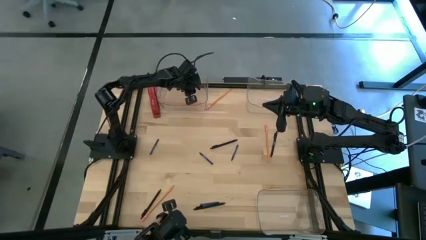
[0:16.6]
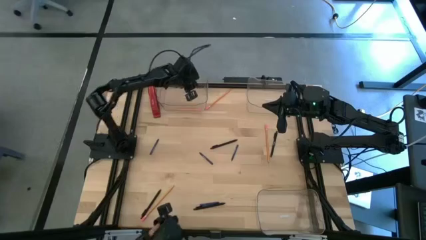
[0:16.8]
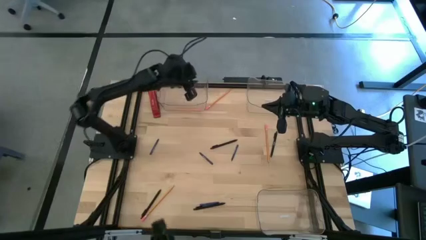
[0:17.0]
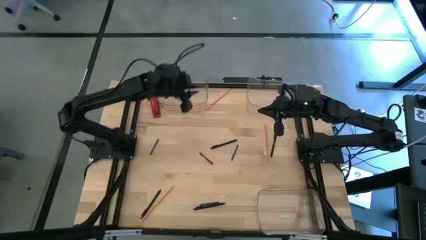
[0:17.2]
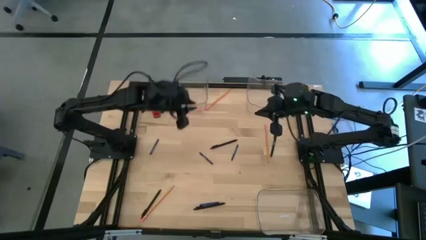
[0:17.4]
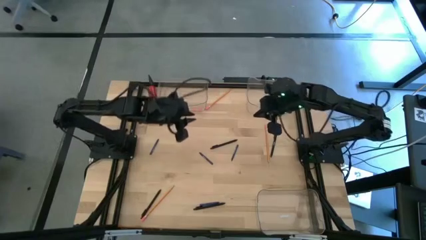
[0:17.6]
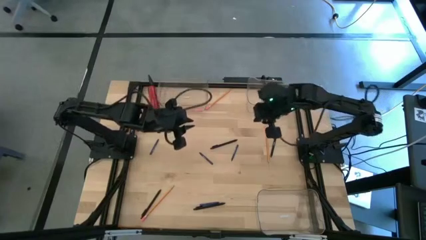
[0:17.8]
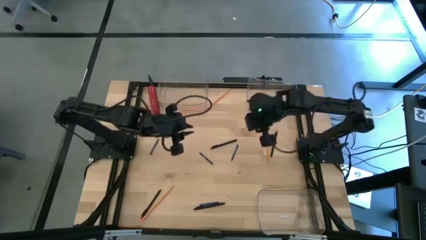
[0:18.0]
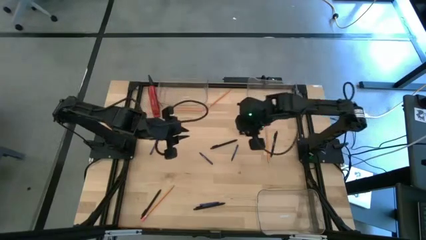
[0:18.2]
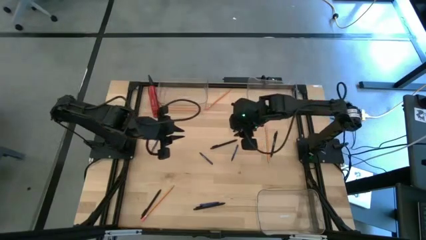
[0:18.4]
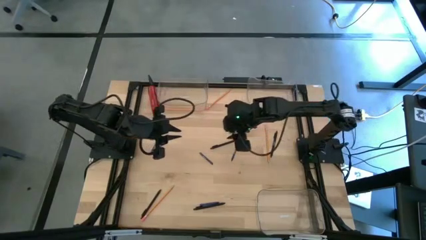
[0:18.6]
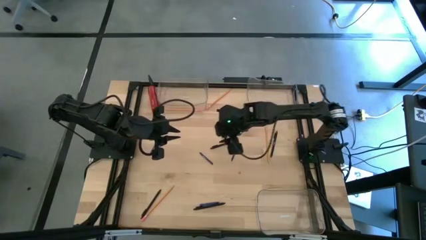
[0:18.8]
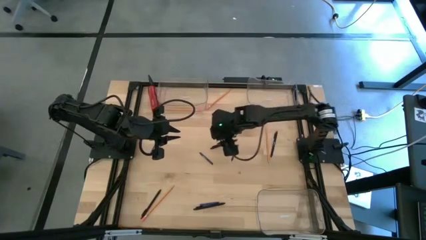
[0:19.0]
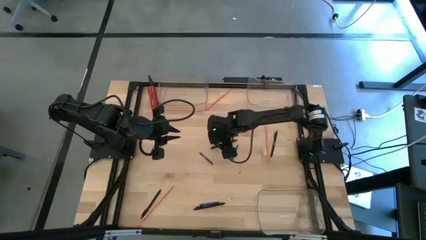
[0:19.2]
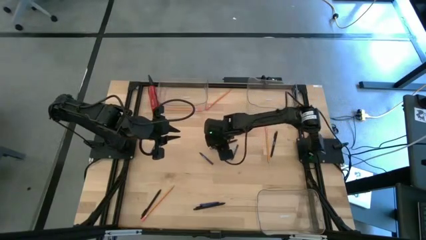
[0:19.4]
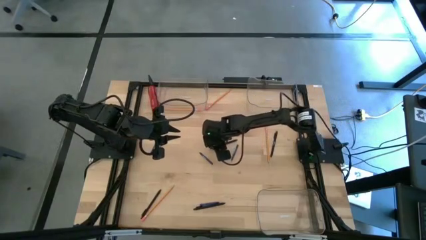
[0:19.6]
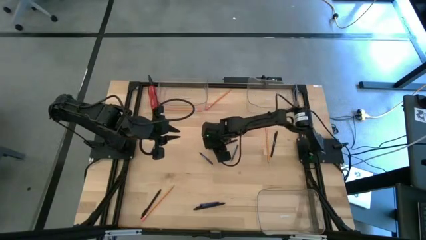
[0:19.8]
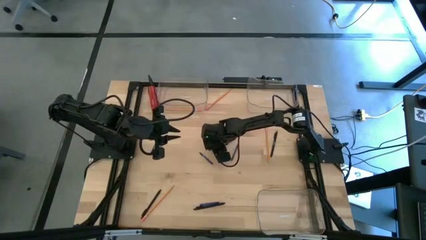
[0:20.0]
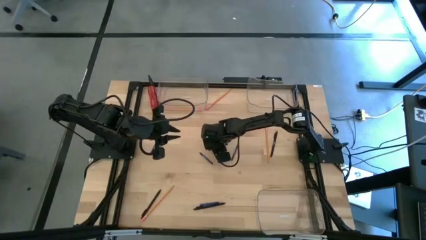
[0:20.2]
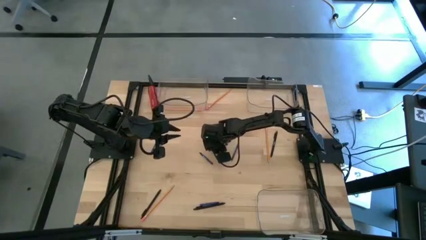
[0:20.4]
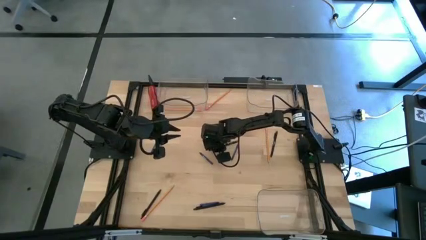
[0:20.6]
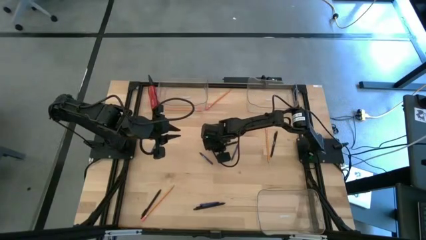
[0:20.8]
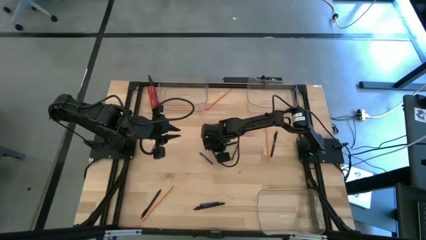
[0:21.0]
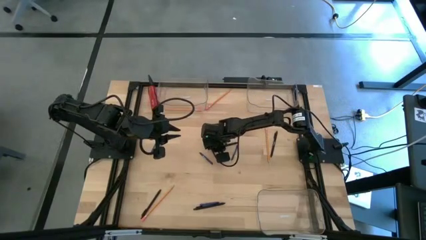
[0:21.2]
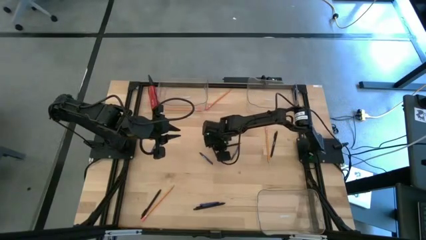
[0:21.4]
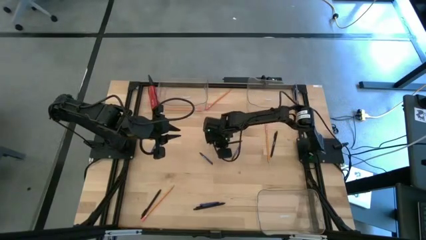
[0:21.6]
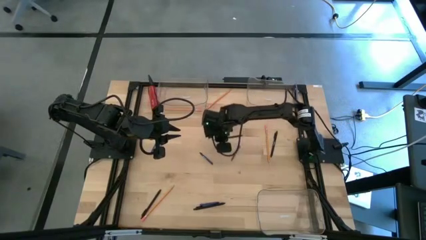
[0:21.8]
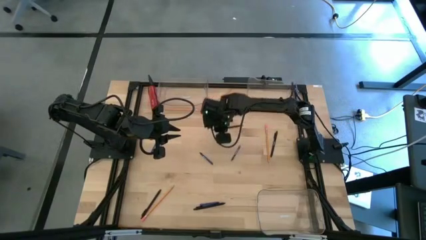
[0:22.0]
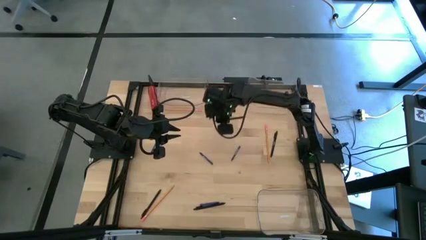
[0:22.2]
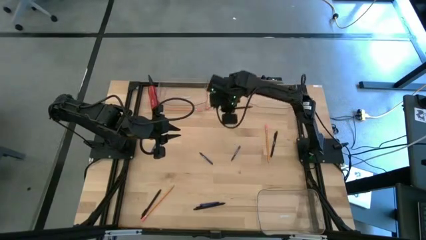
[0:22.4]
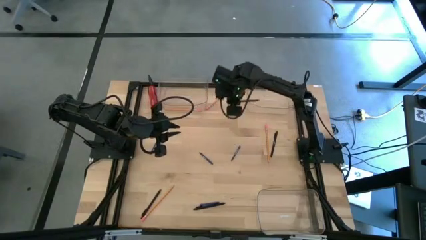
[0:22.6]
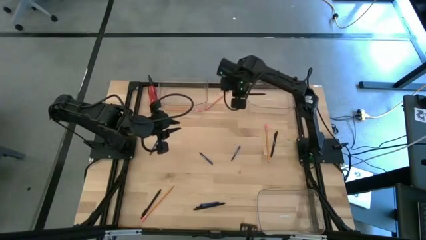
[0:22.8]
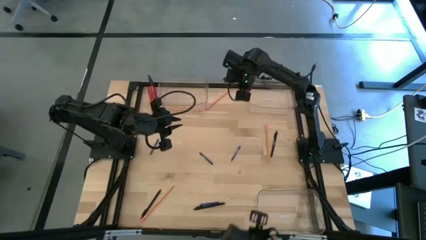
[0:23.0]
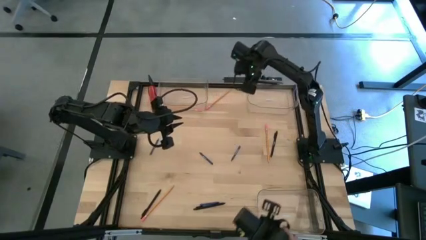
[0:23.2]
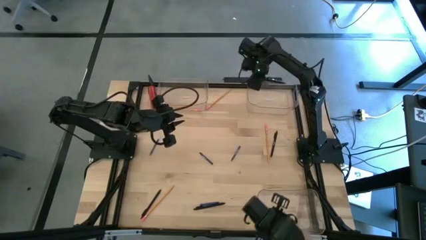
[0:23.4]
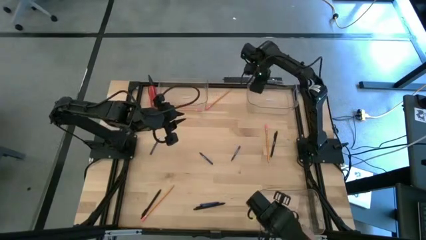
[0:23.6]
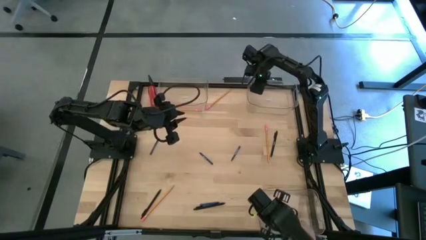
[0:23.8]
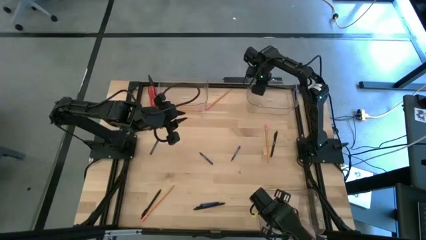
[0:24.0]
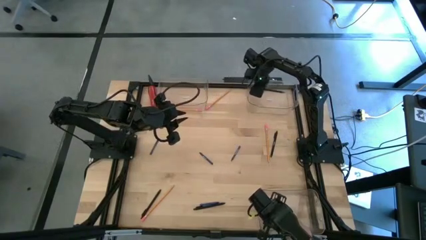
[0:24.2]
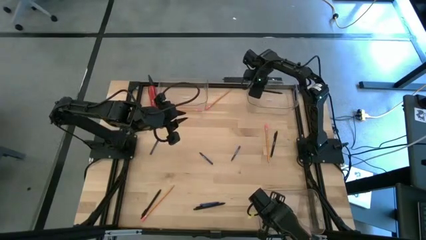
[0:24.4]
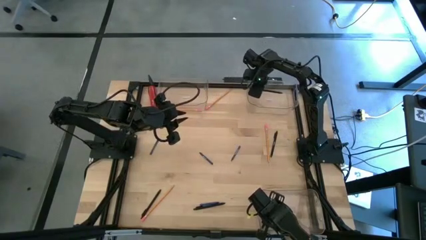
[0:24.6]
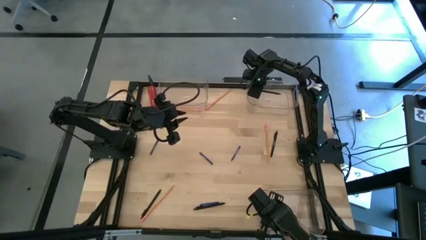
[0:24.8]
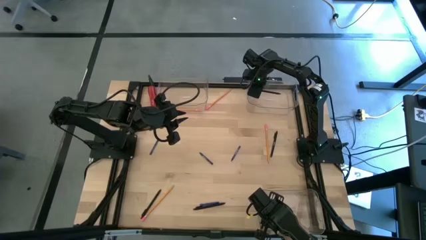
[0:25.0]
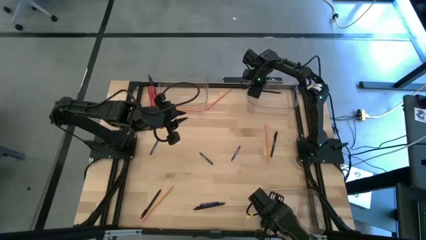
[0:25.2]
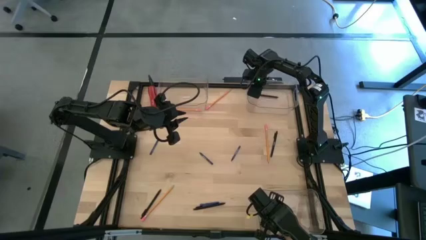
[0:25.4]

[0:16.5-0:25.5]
Task: Sort crayons/erasers/pens/pencils in bins
Put the black pen into the top right transparent bin

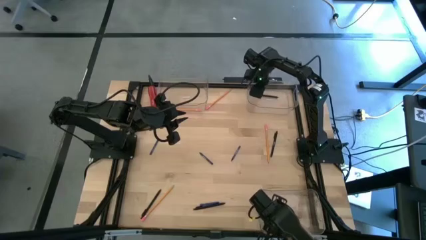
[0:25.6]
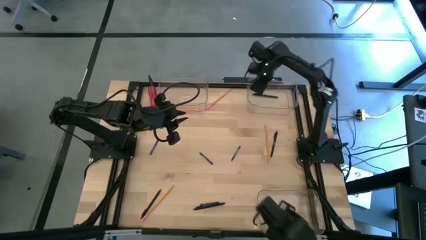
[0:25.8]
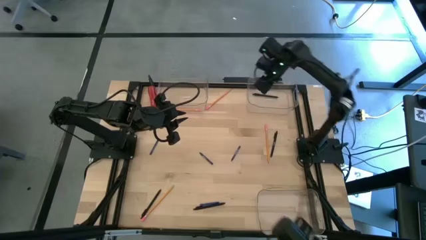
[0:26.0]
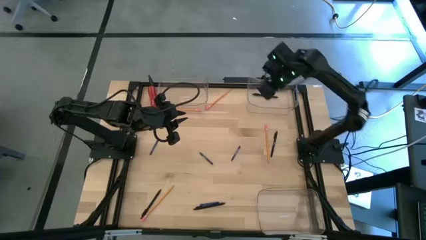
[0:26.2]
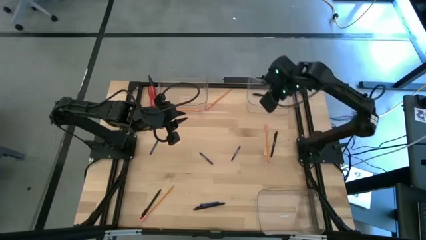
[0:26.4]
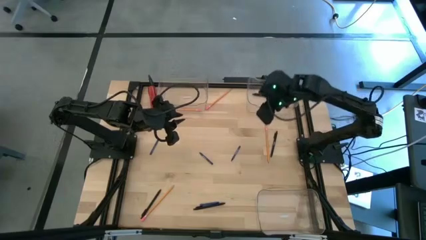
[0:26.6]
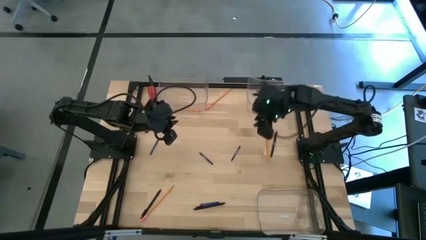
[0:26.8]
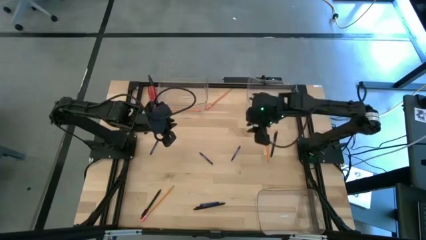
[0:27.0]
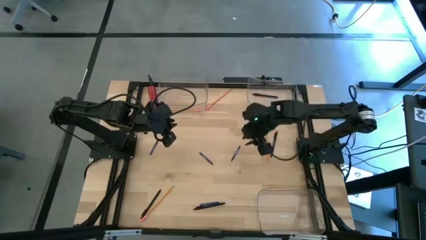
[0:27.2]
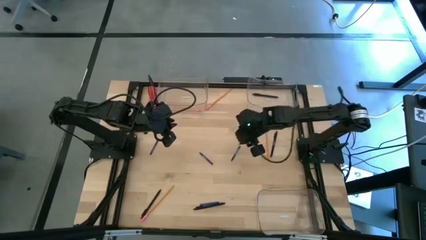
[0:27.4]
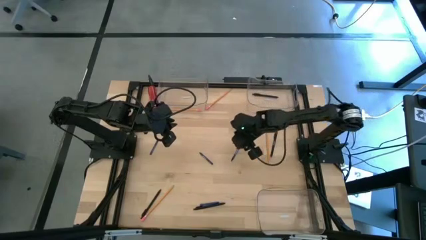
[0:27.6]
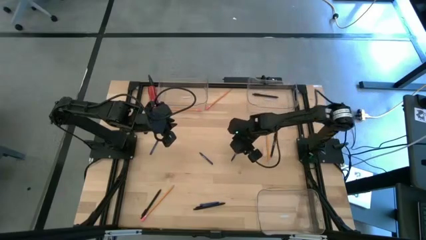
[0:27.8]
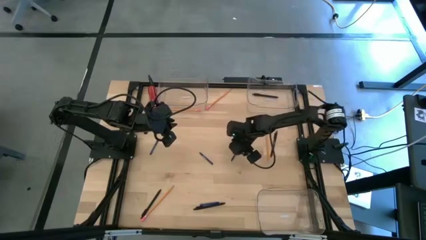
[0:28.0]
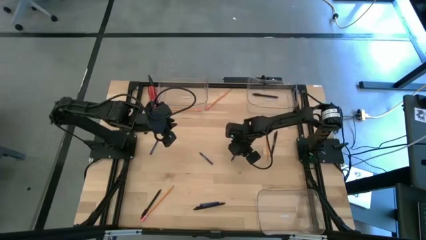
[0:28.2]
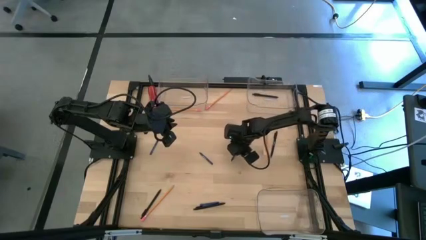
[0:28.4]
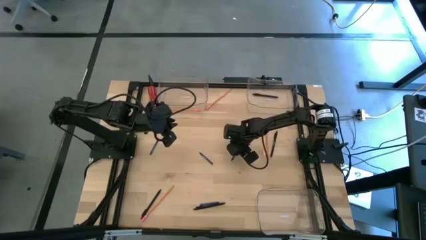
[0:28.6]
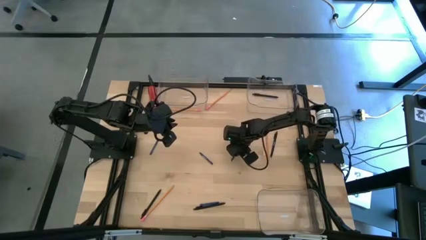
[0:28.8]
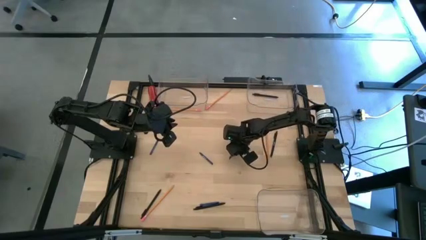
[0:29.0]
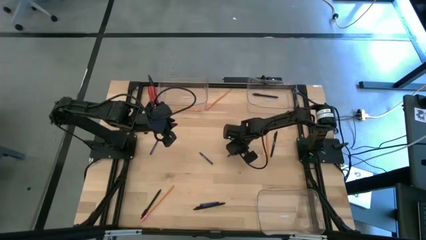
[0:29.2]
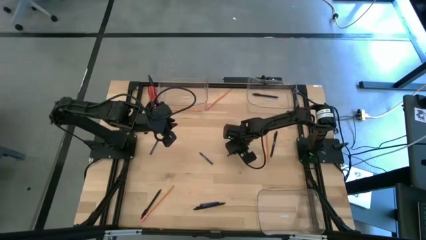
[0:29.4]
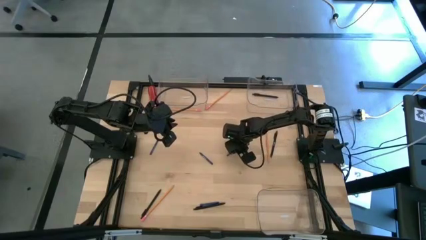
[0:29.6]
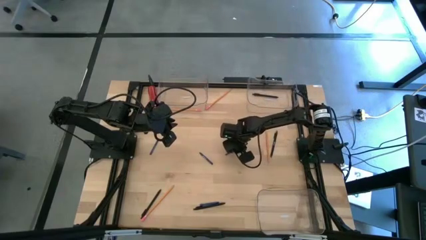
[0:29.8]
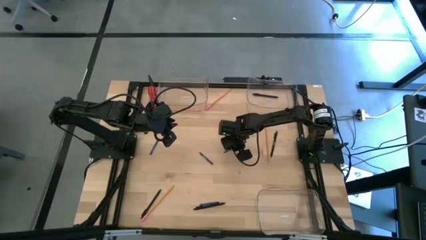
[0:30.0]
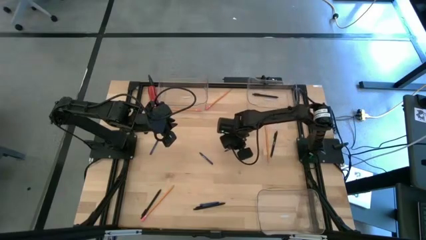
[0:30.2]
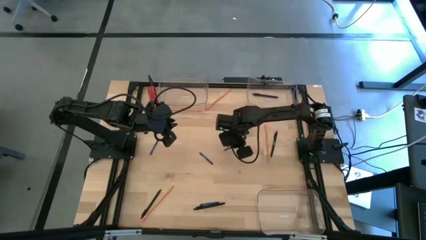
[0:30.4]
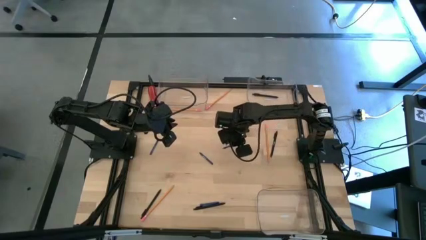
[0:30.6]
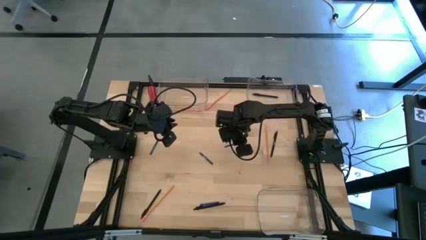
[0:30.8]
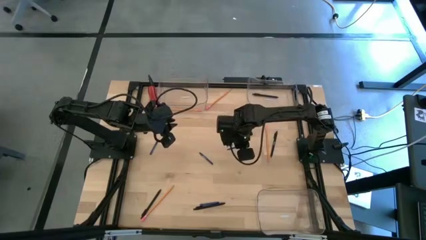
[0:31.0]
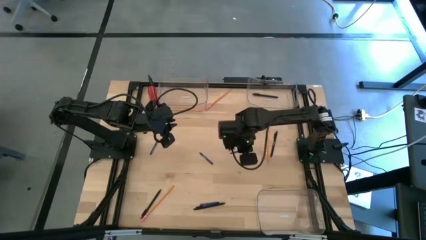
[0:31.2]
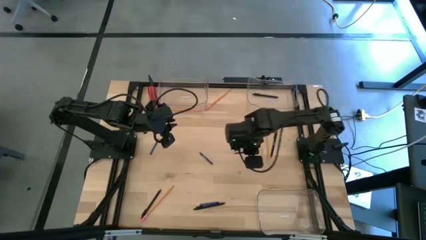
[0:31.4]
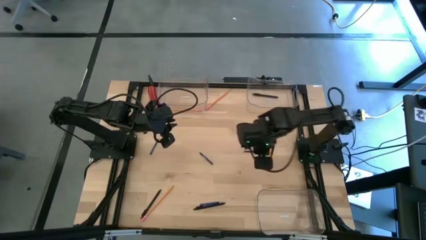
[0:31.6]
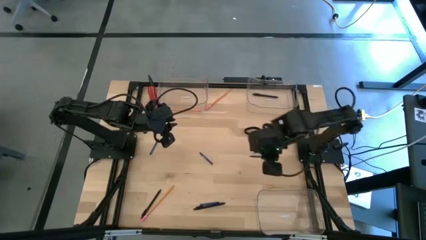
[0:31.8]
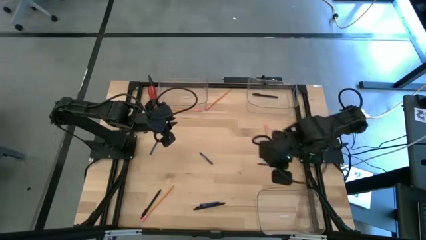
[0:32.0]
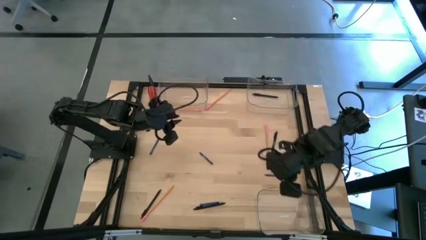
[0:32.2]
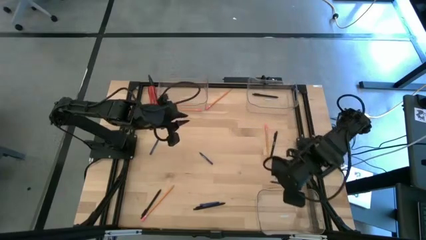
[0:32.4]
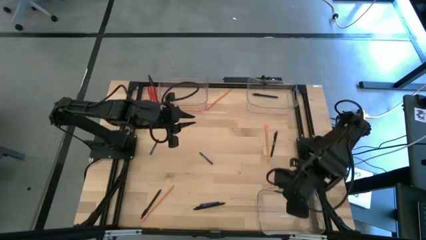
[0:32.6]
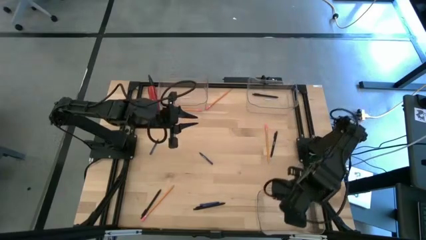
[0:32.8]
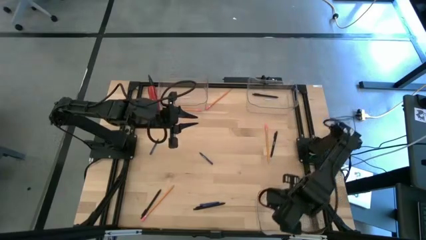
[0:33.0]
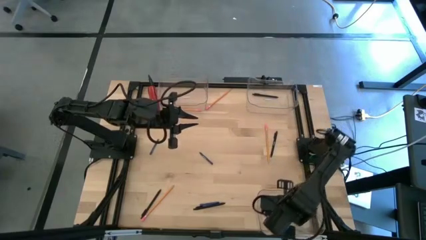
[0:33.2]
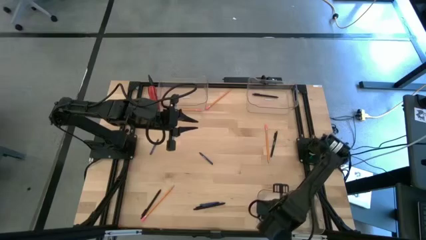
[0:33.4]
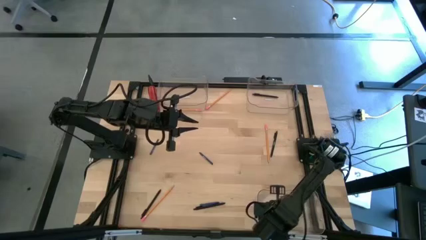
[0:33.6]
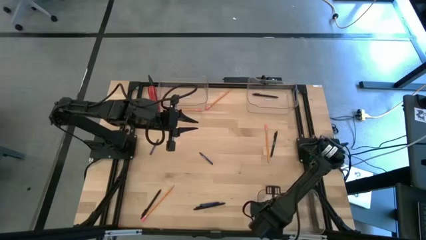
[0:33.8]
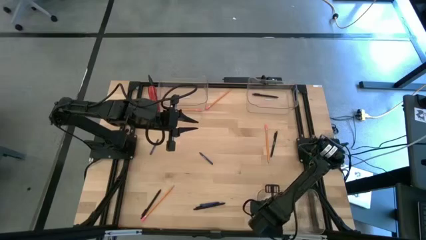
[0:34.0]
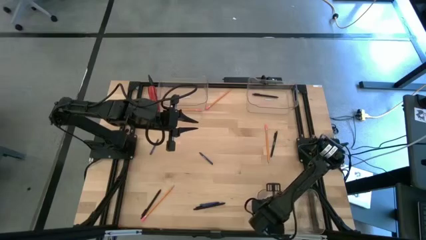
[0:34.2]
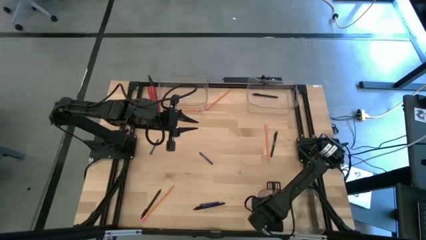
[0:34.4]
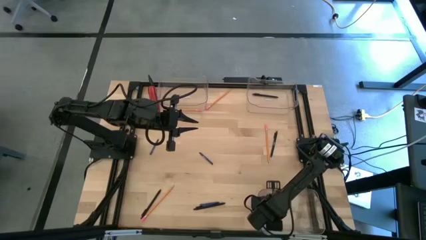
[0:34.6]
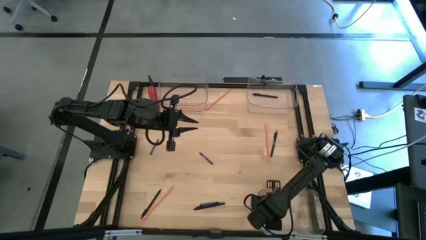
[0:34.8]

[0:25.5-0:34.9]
Put the blue crayon into the bottom transparent bin
